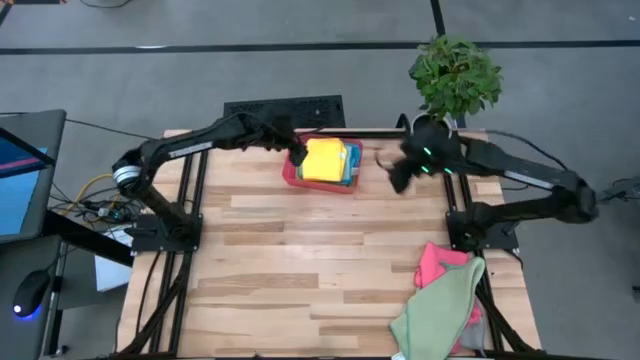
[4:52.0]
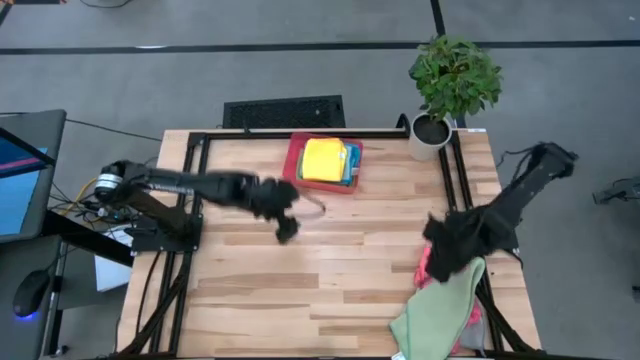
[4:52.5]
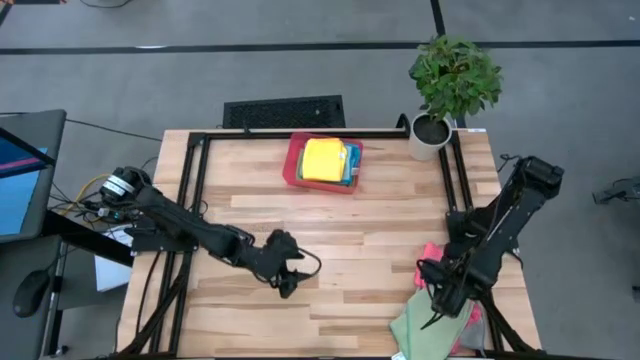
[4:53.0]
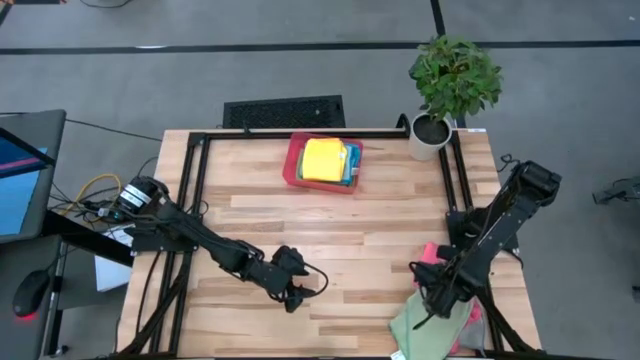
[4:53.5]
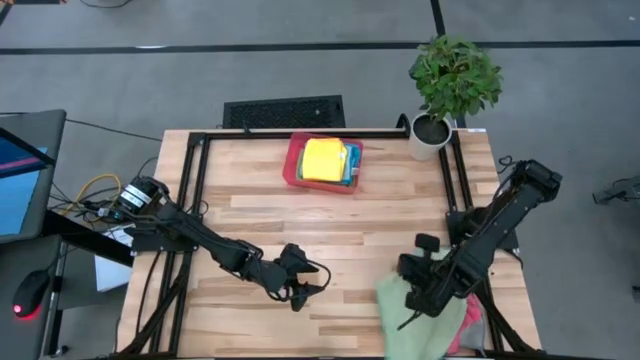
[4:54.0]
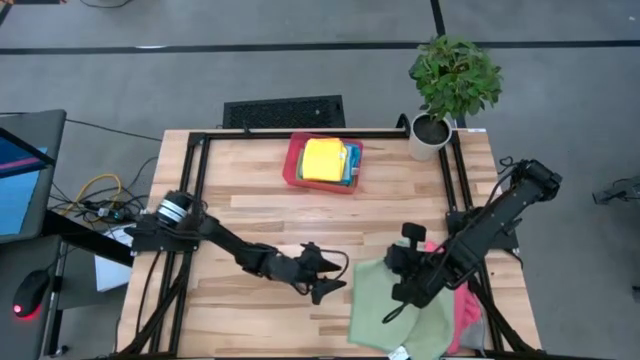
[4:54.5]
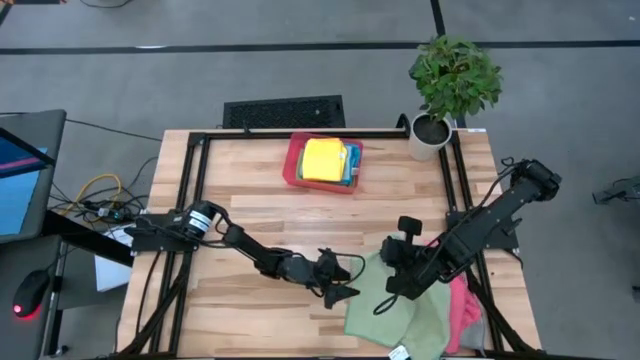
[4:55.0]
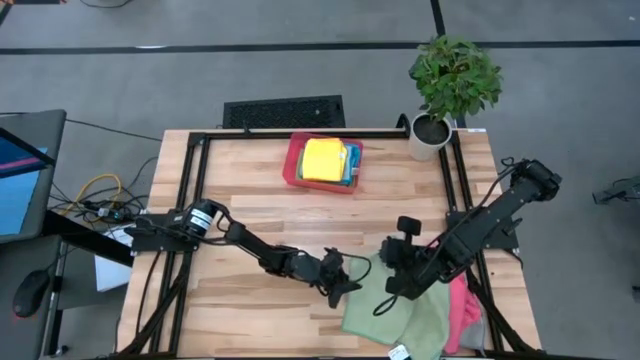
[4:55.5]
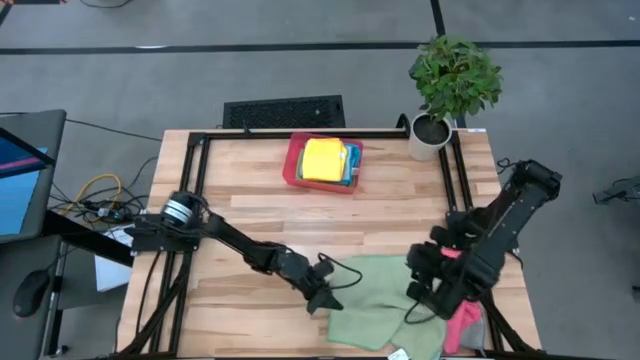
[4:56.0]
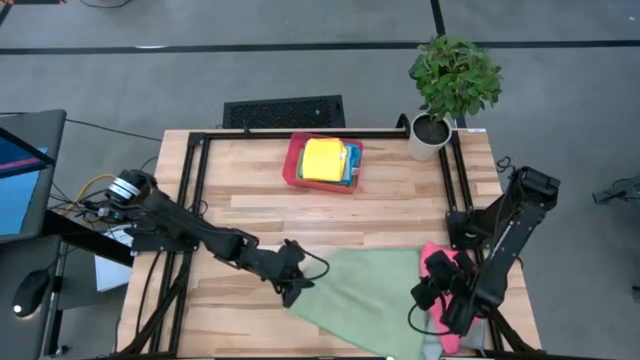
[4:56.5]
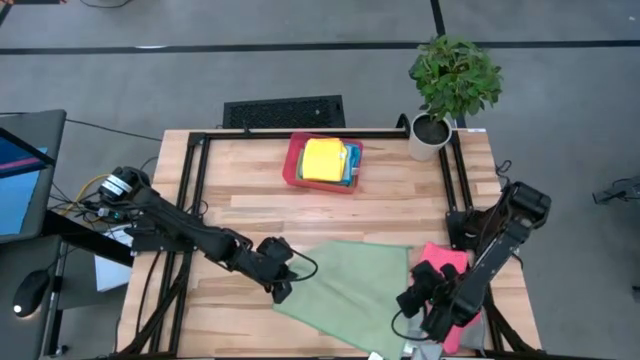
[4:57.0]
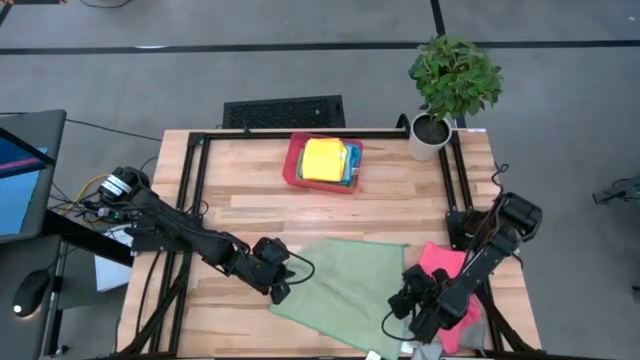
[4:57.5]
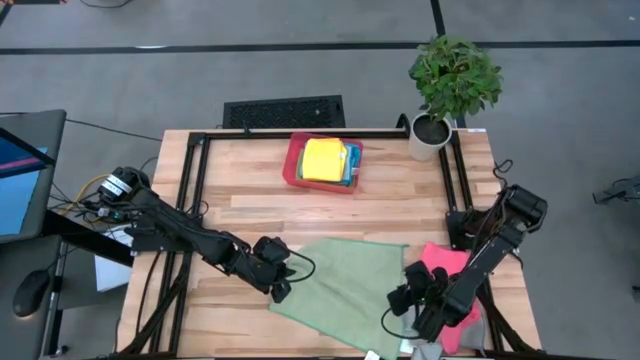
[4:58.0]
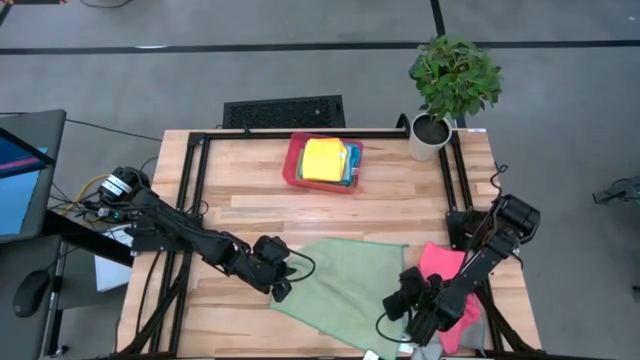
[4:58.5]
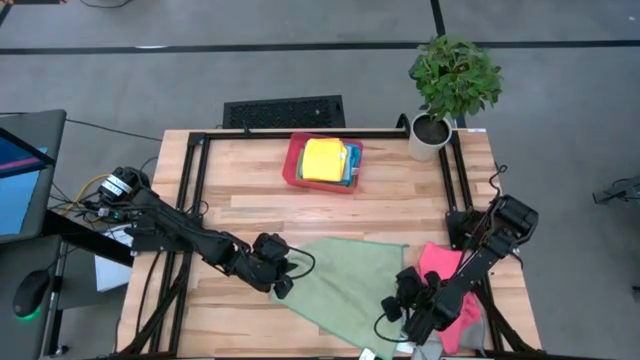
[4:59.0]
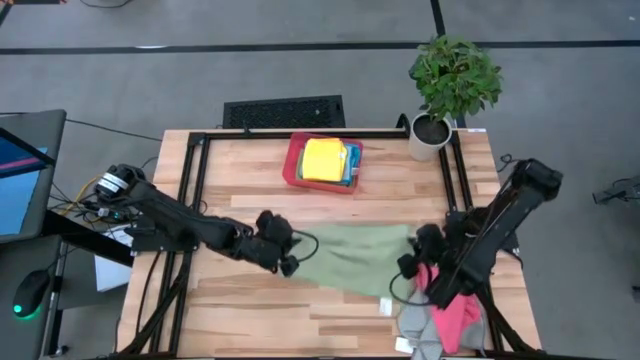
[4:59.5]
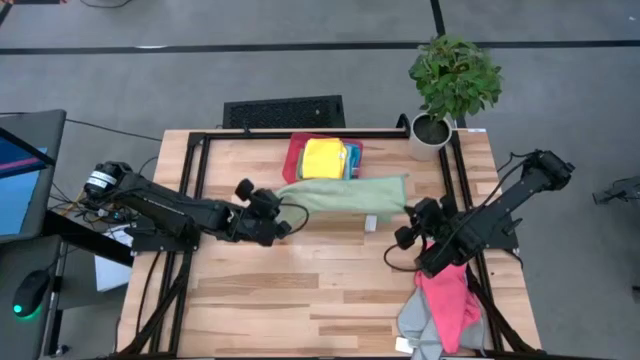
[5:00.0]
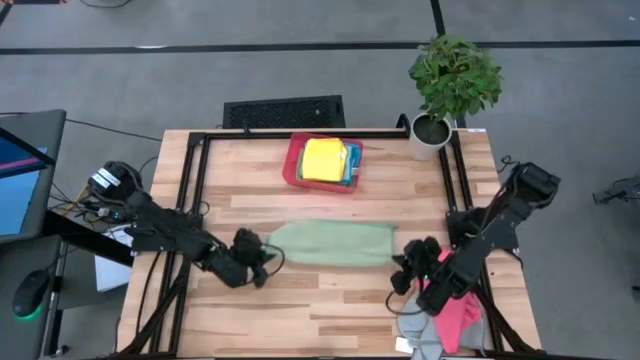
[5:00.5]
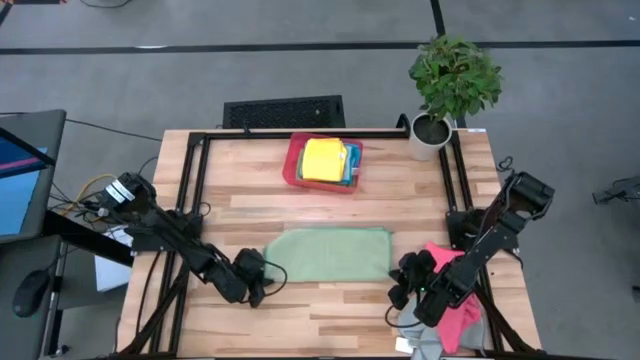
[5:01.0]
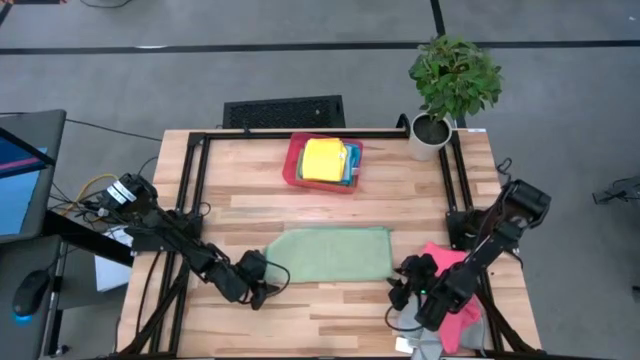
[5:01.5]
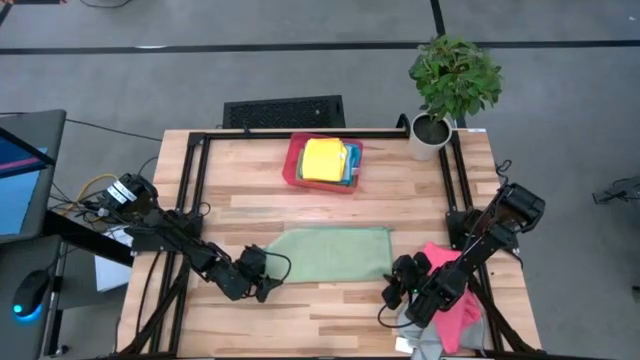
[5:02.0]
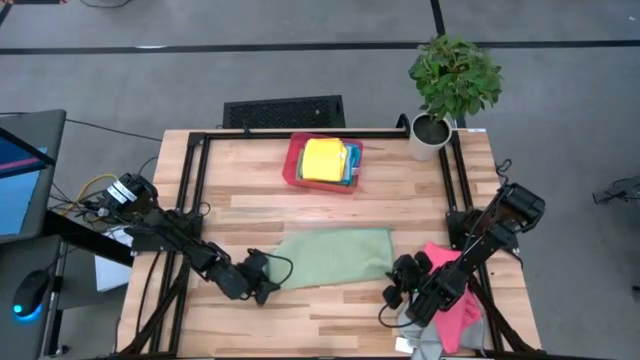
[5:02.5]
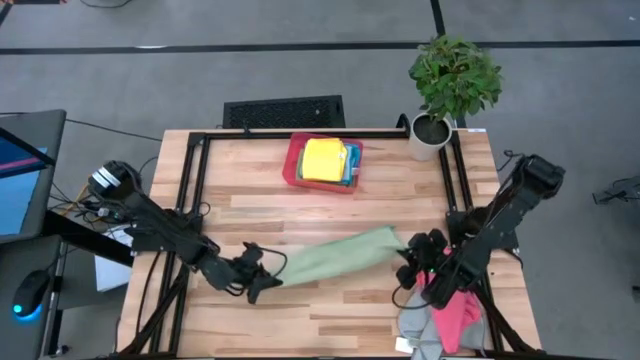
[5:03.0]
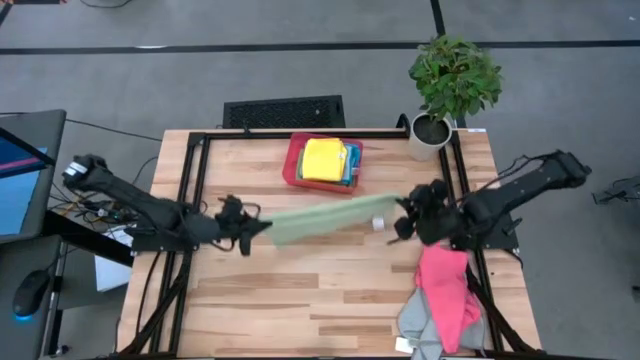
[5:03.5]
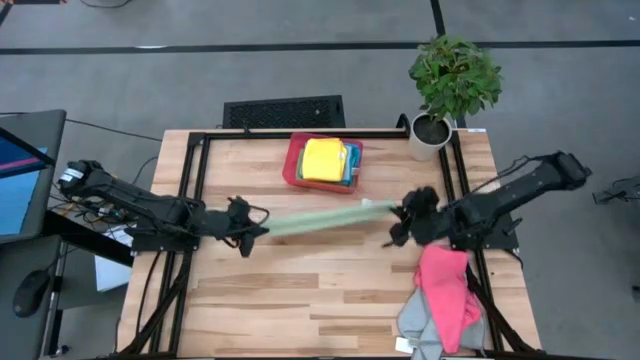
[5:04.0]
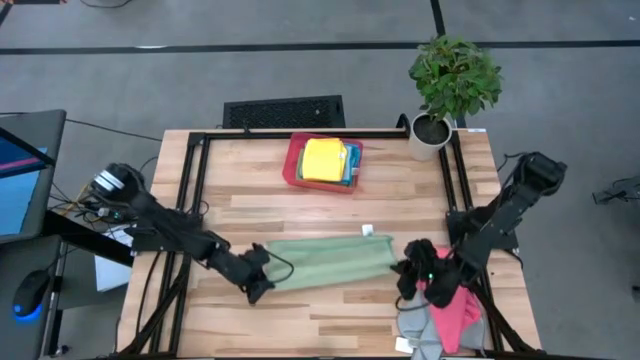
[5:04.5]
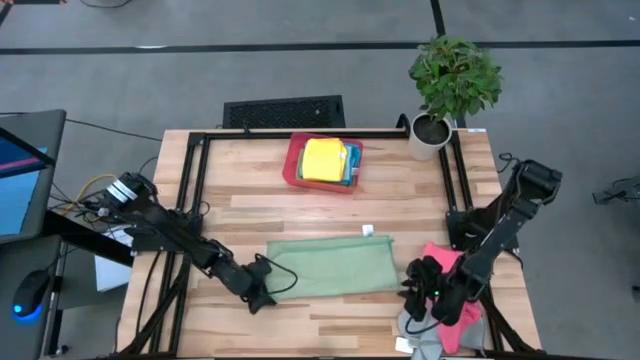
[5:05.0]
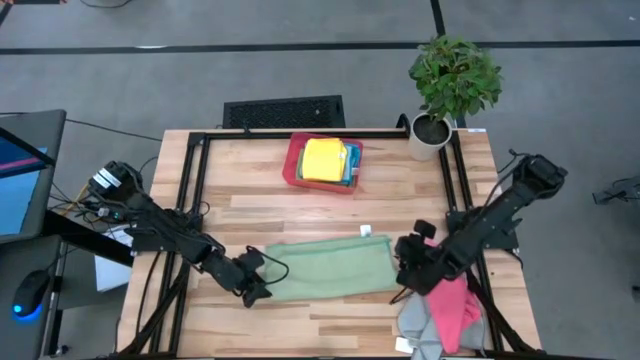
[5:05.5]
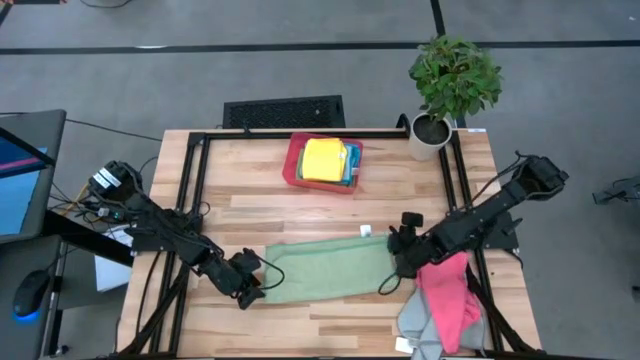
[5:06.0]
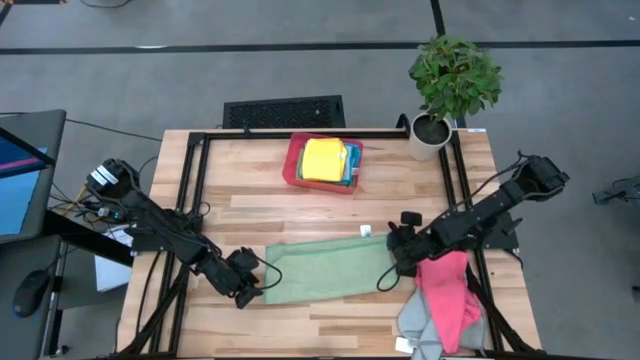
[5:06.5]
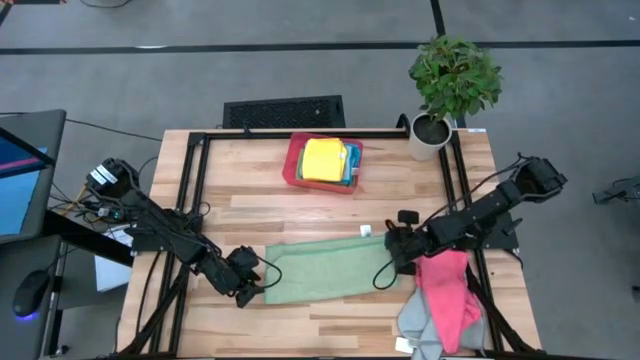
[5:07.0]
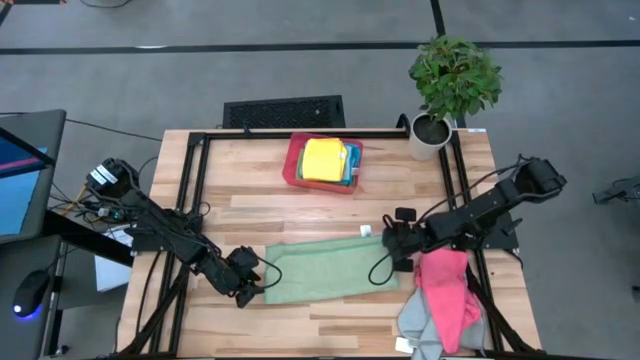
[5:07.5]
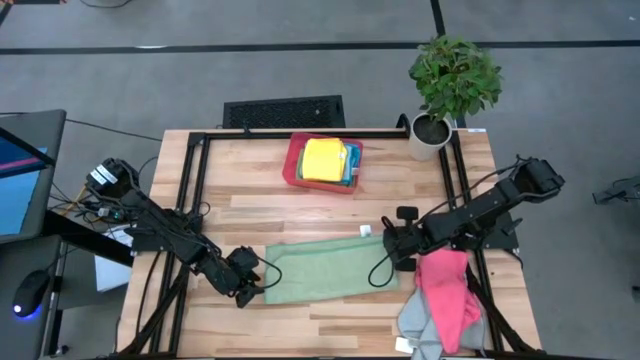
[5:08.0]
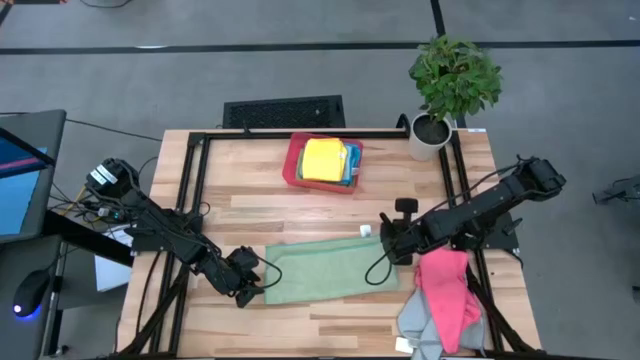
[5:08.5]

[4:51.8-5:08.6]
Task: Fold microfiber towels
Fold the green microfiber cloth

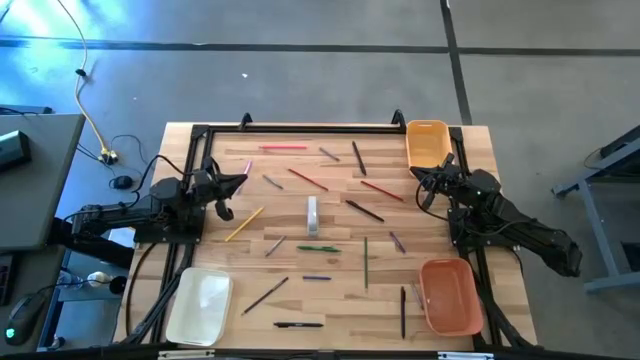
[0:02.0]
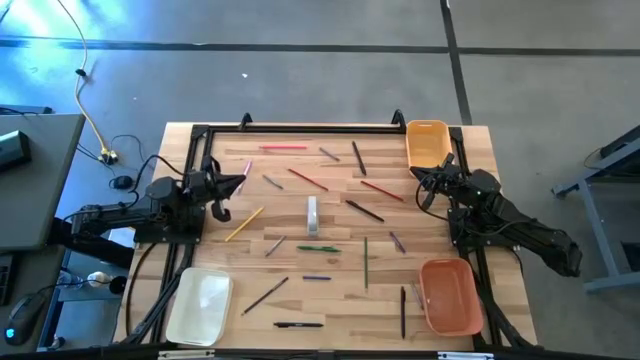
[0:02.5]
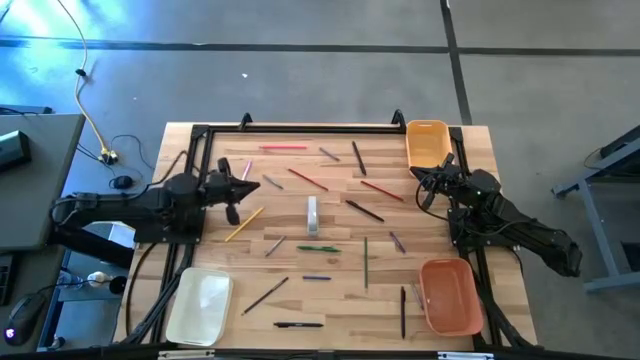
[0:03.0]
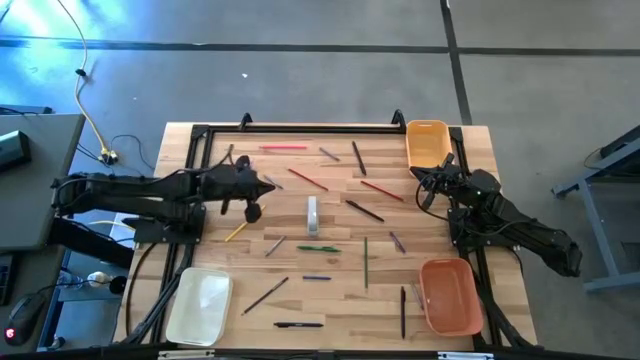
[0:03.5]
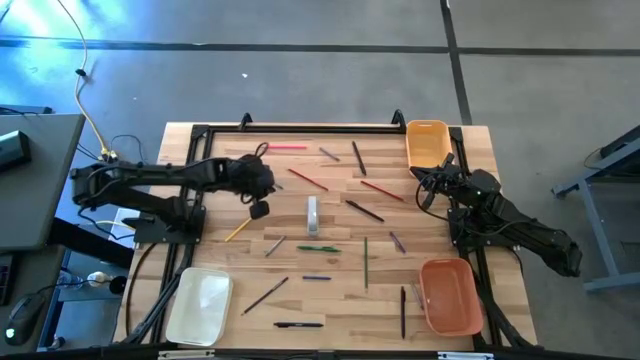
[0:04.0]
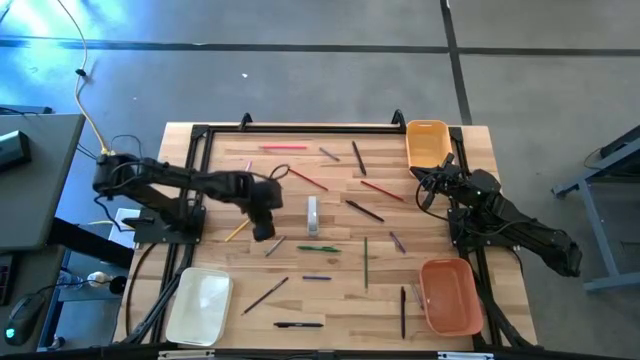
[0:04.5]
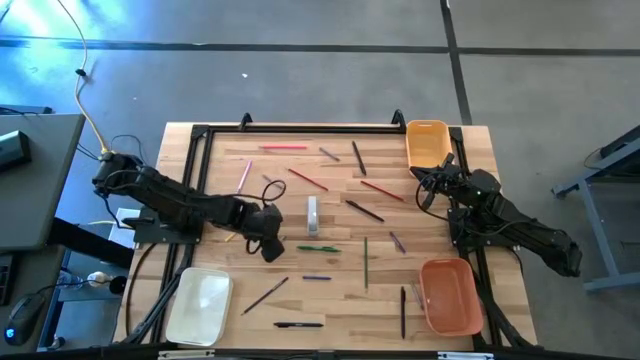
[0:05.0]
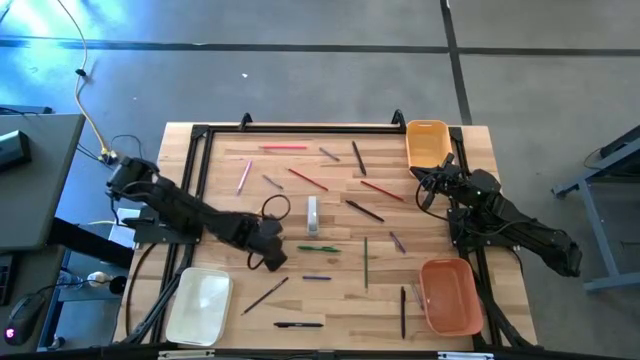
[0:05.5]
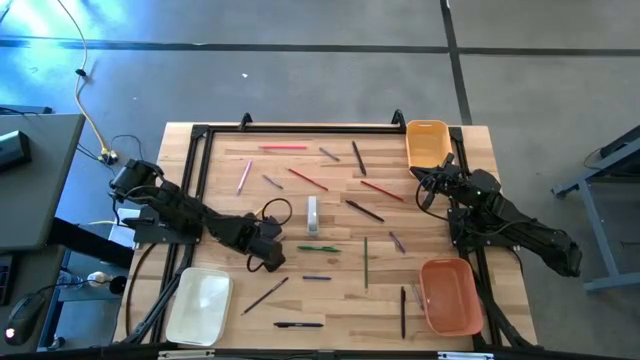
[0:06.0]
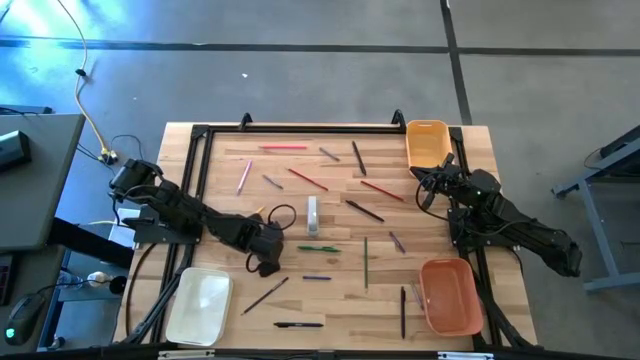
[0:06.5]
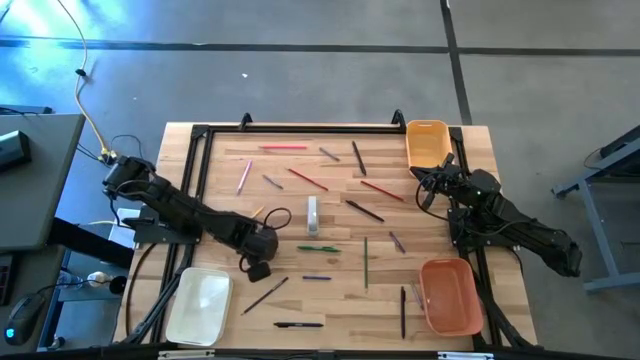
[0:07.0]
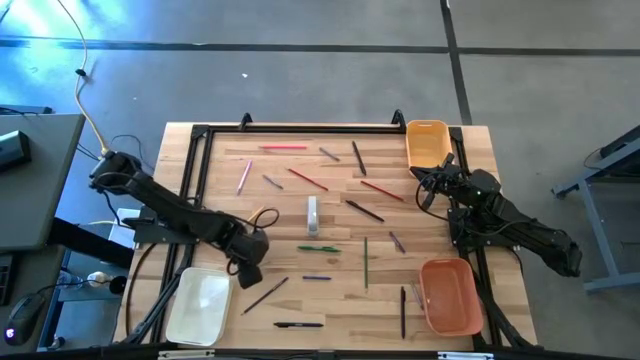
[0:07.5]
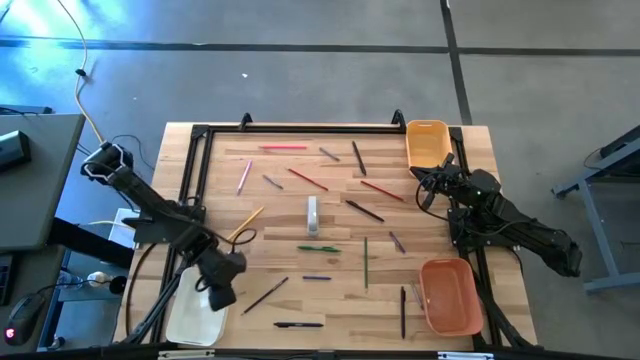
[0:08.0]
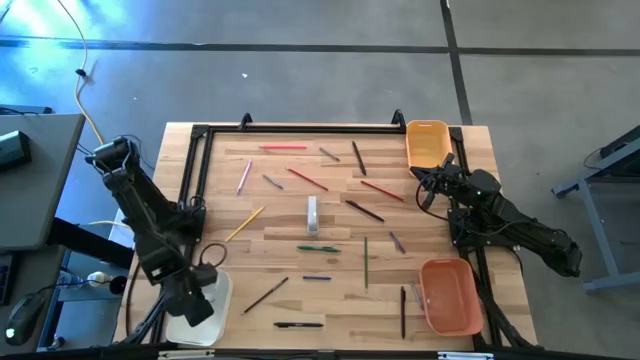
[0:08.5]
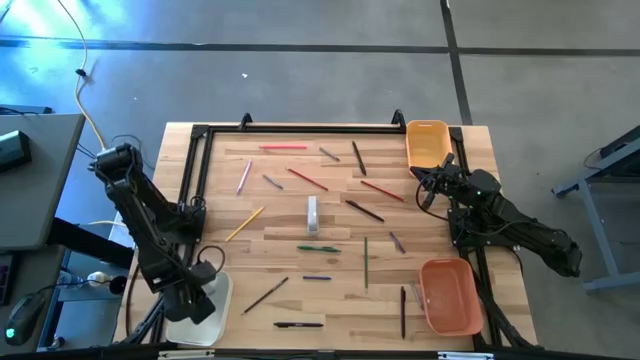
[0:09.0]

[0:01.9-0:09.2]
Task: Sort crayons/erasers/pens/pencils in bins
Put the gray crayon into the white bin
